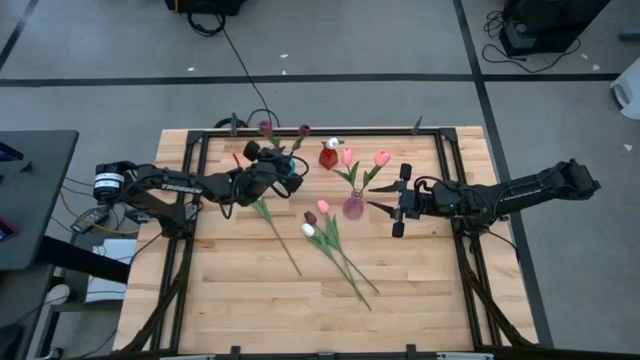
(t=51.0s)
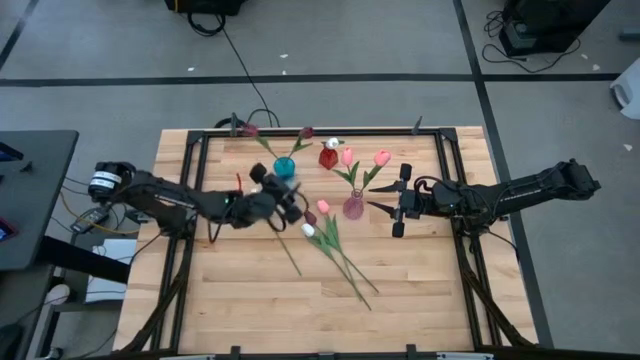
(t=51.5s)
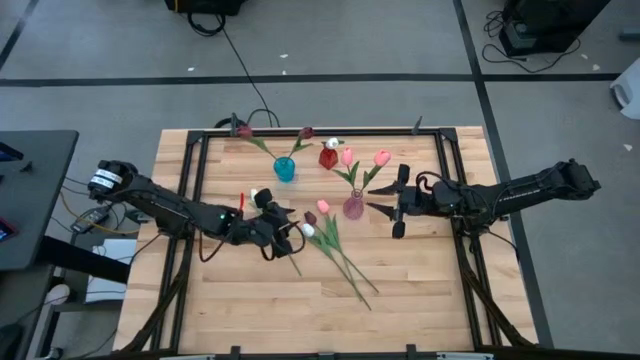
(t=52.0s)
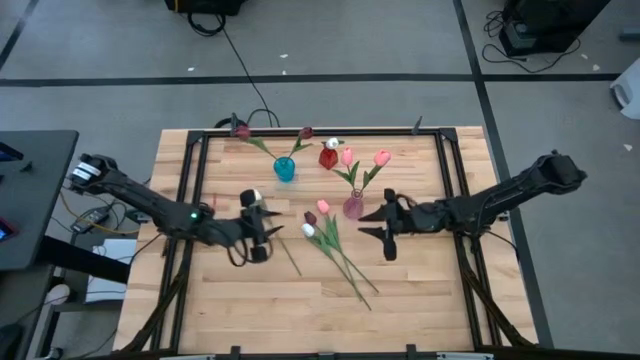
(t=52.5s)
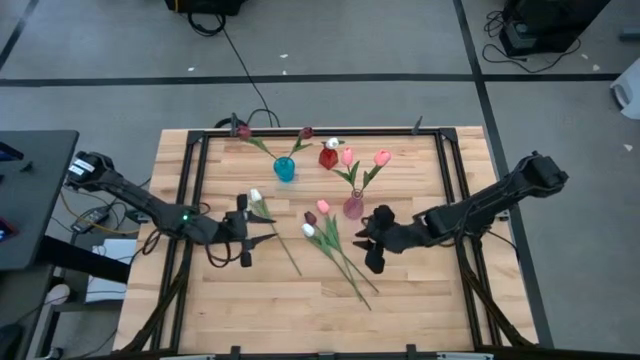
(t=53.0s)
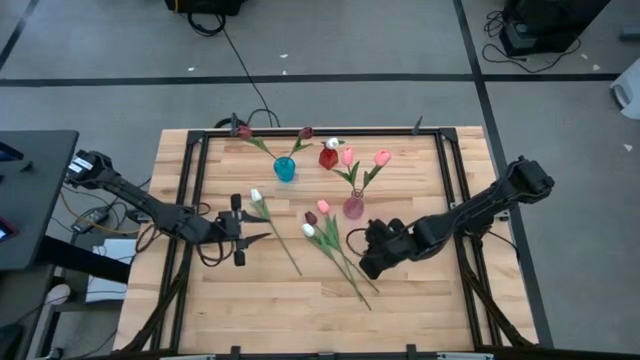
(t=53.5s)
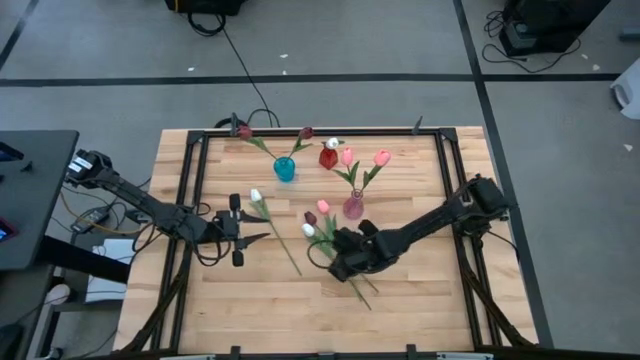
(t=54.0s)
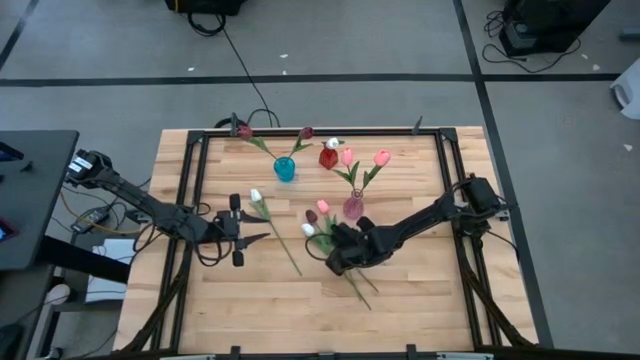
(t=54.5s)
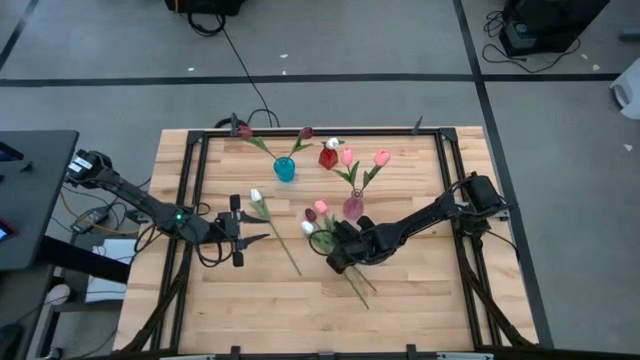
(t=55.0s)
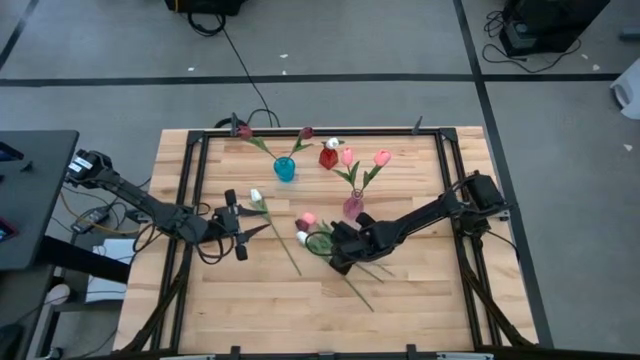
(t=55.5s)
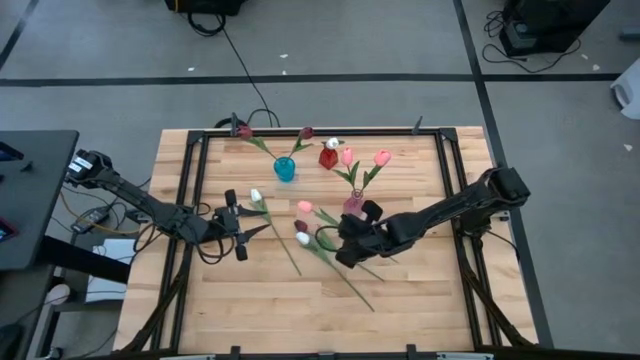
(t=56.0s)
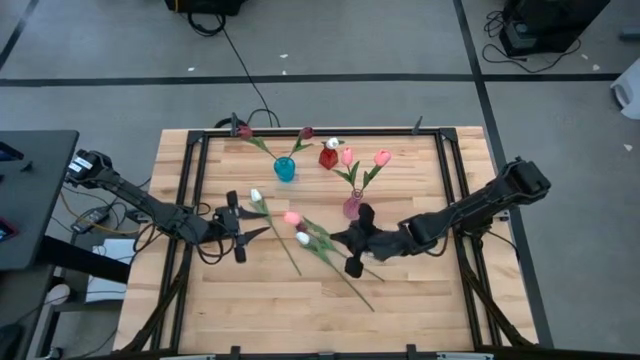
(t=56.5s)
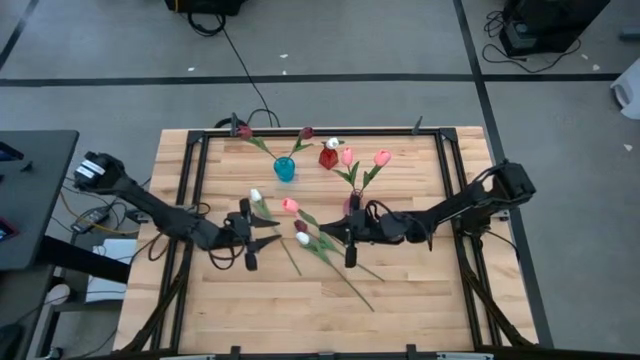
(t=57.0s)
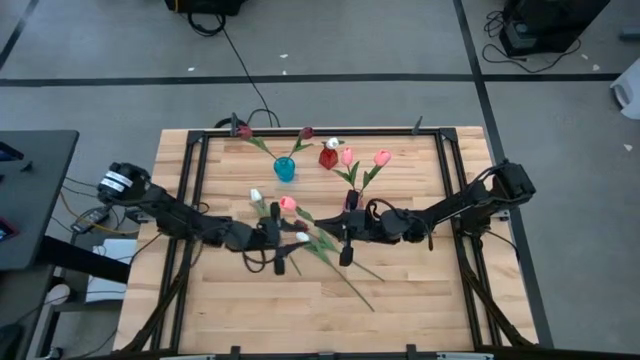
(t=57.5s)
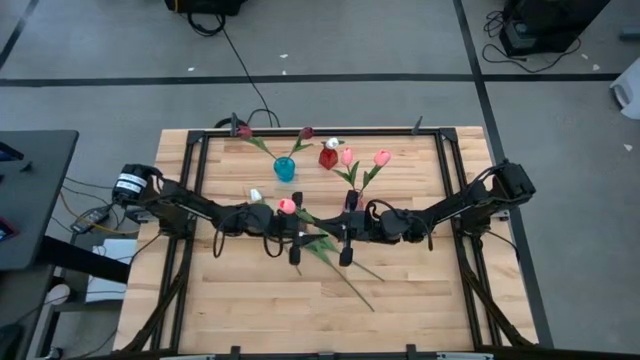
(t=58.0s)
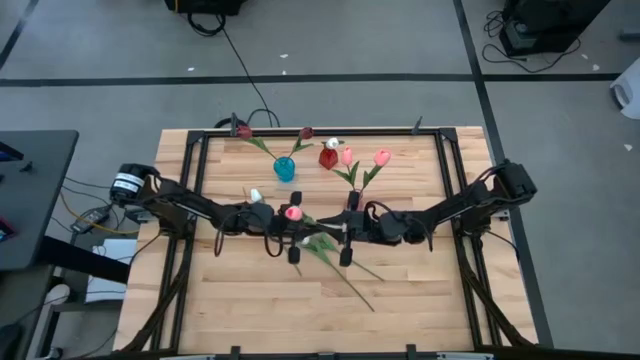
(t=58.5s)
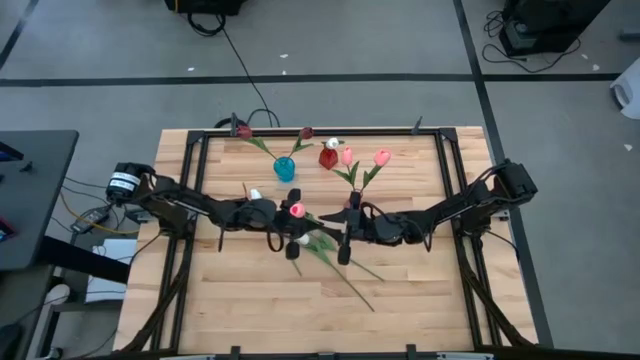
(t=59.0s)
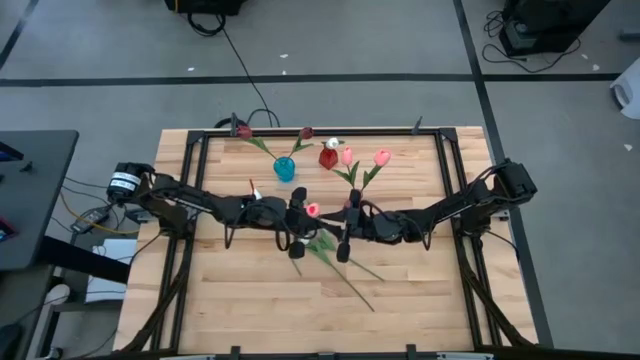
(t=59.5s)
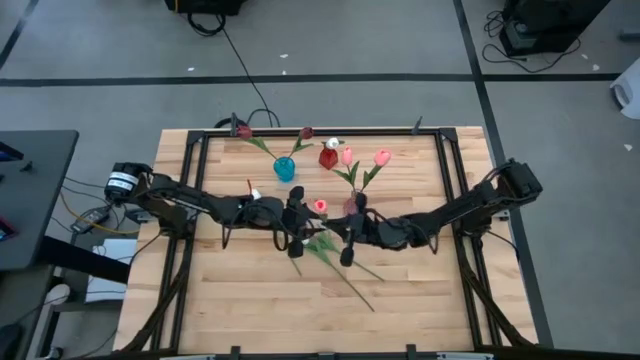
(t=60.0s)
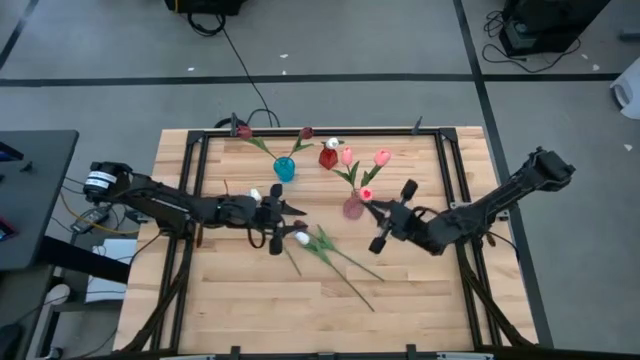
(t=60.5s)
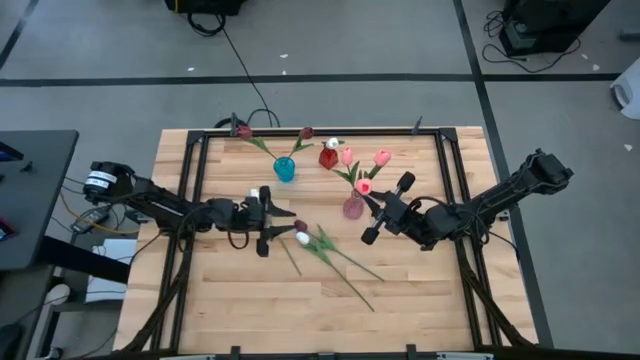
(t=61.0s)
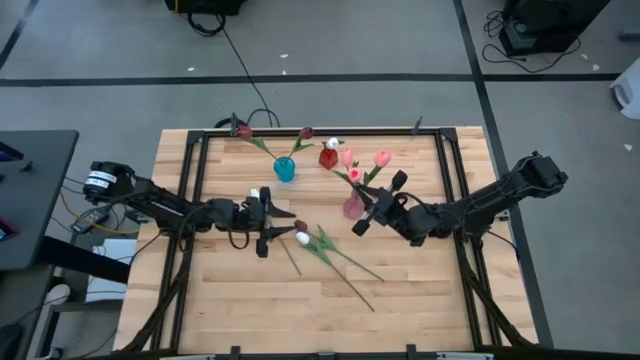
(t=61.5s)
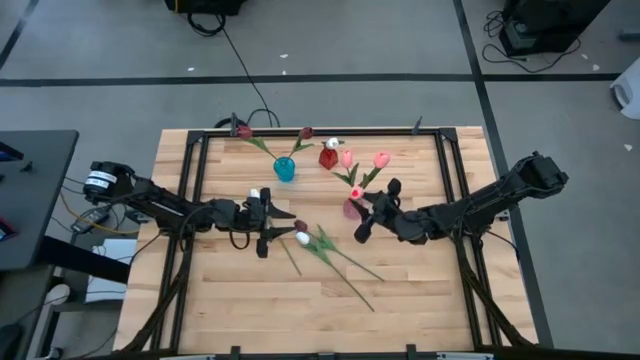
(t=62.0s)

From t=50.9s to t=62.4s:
Task: Sort flowers into vase by color
Put the pink tulip into the violet vase

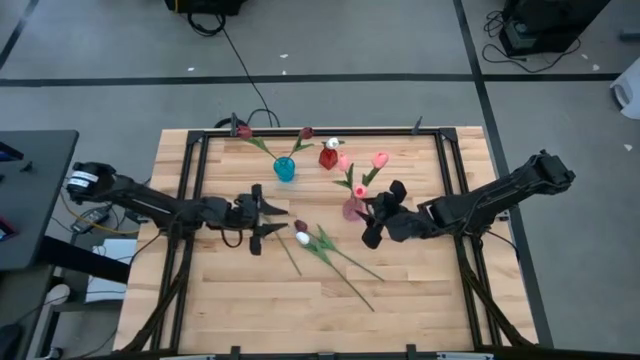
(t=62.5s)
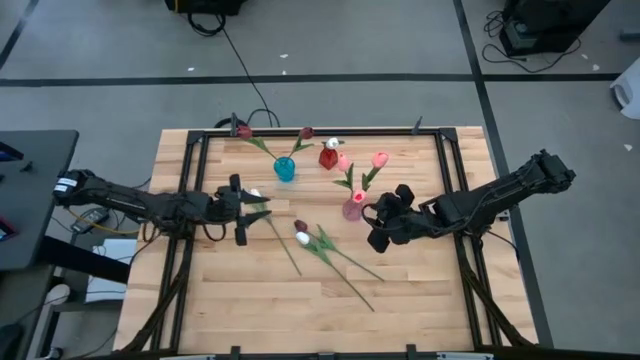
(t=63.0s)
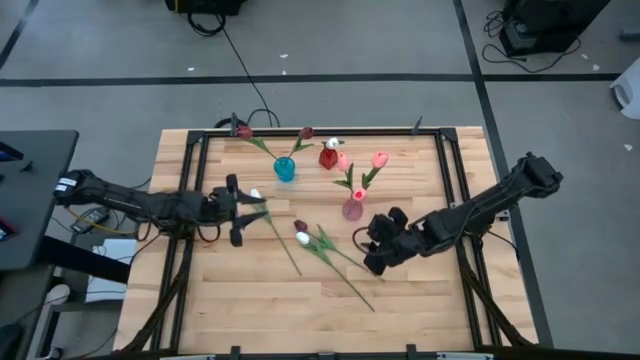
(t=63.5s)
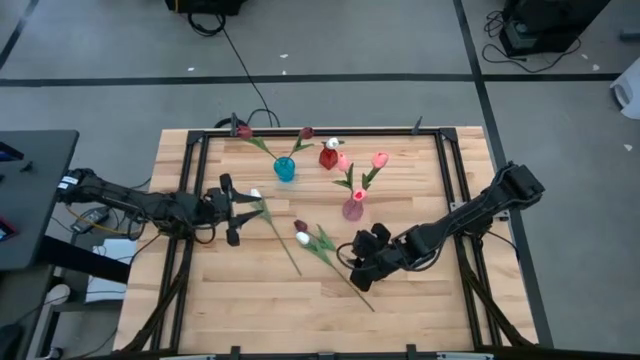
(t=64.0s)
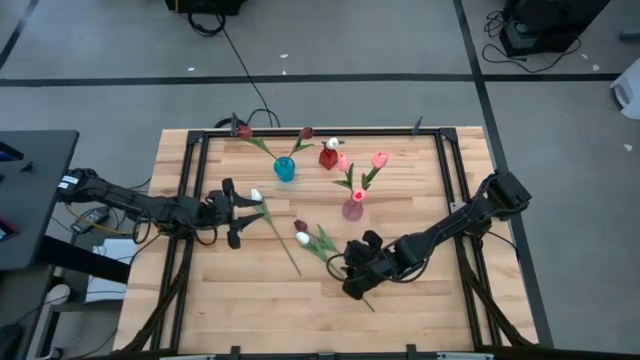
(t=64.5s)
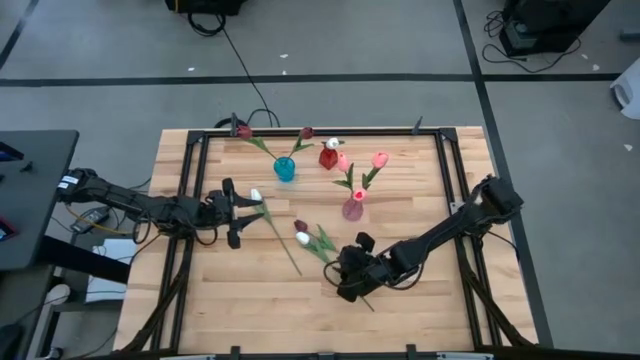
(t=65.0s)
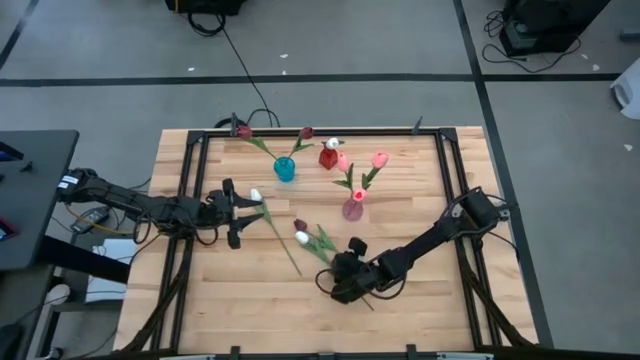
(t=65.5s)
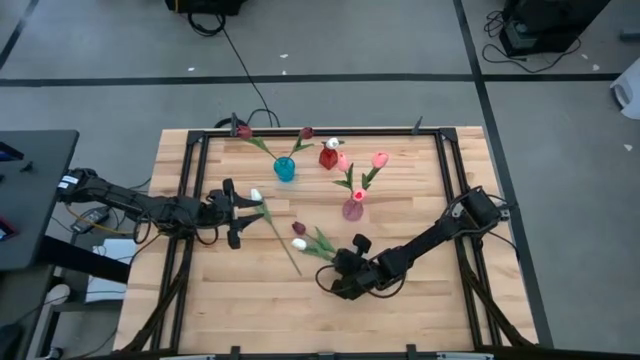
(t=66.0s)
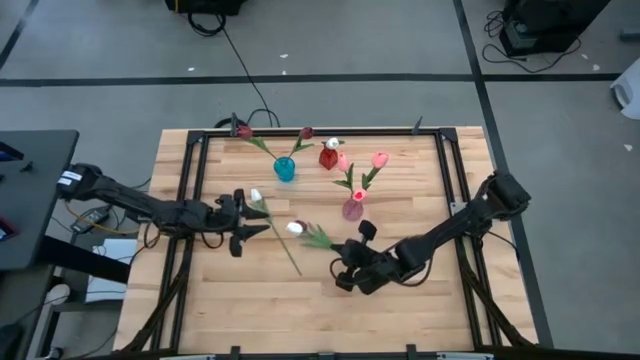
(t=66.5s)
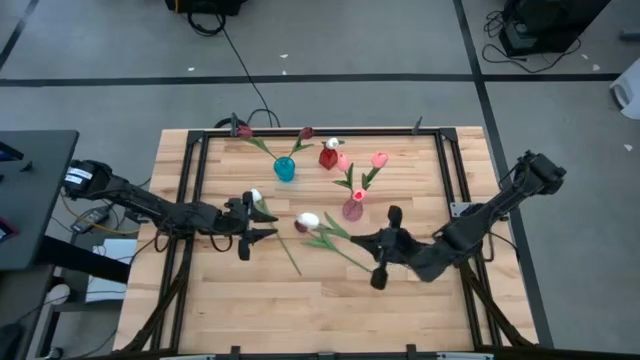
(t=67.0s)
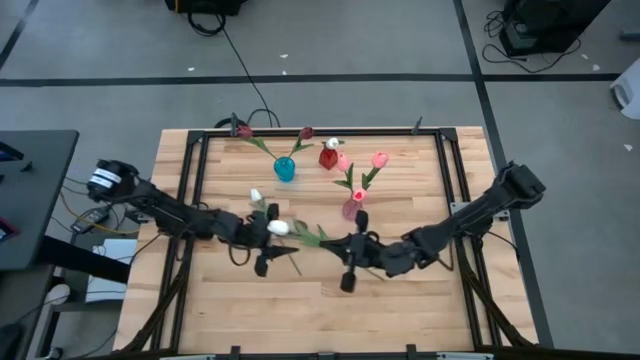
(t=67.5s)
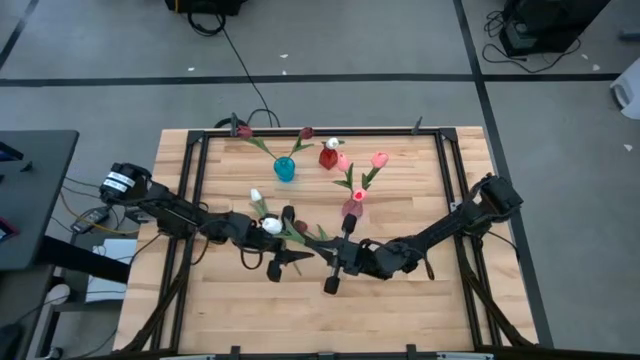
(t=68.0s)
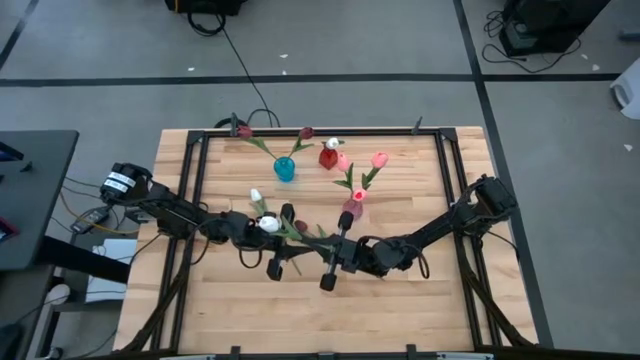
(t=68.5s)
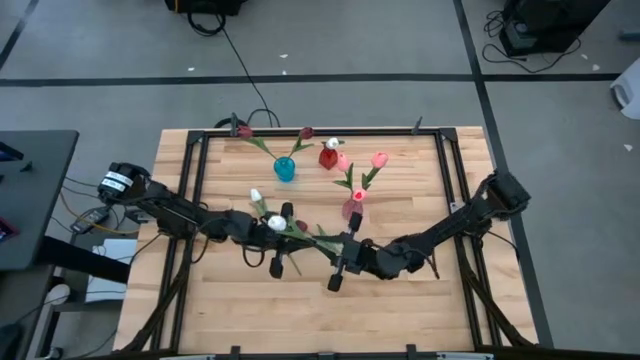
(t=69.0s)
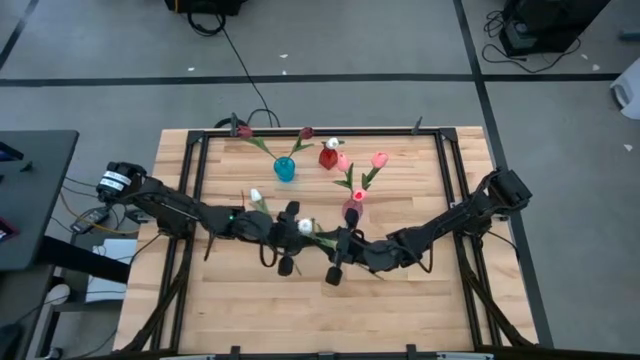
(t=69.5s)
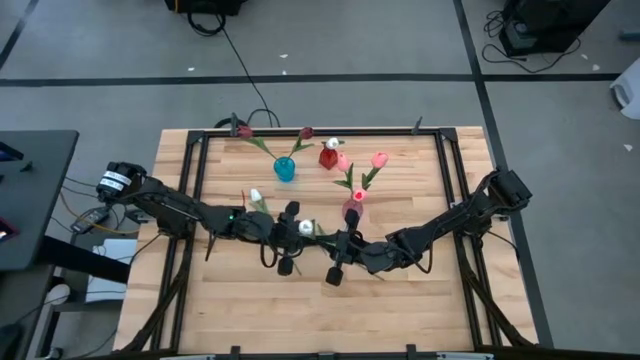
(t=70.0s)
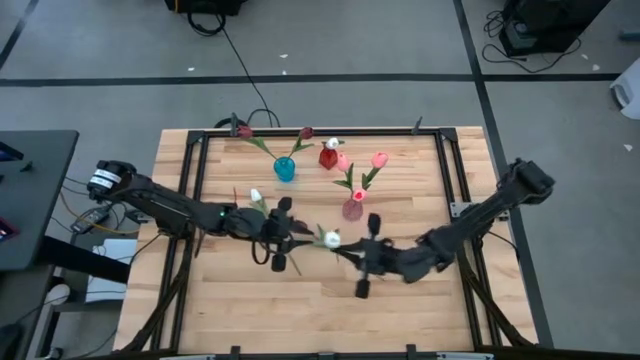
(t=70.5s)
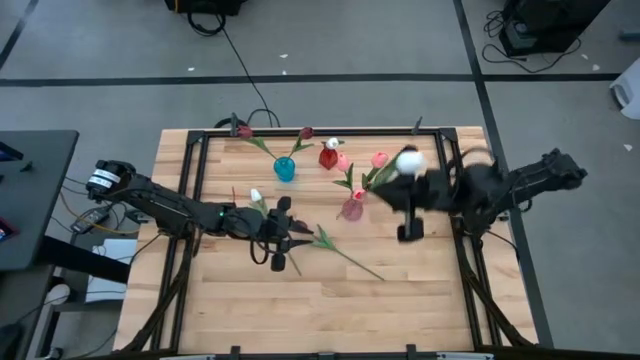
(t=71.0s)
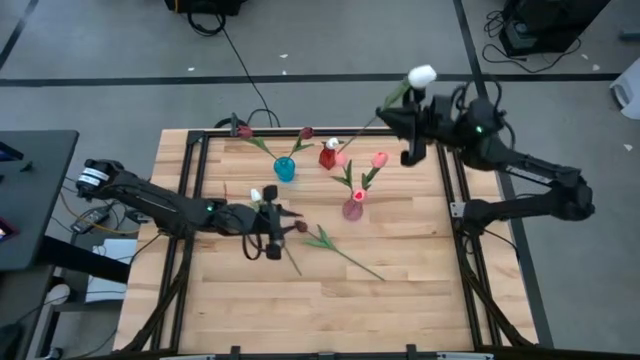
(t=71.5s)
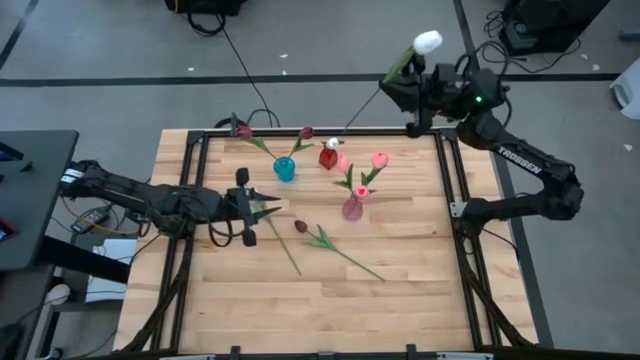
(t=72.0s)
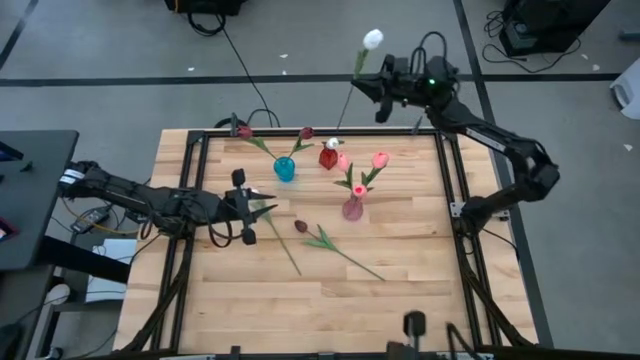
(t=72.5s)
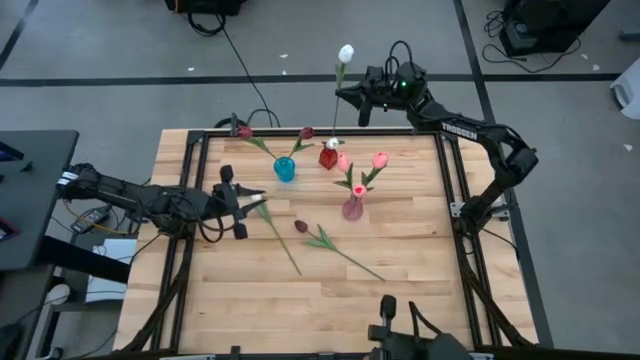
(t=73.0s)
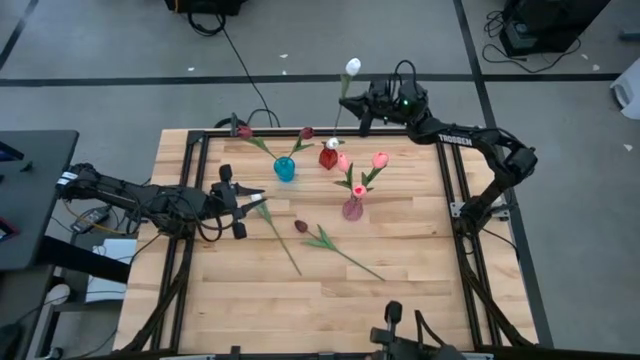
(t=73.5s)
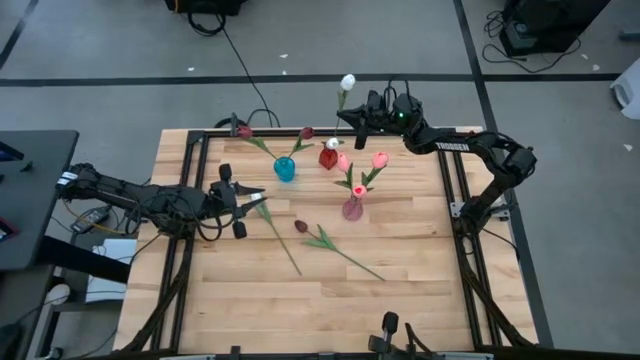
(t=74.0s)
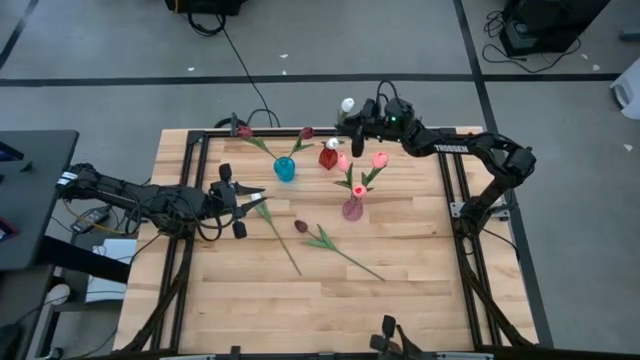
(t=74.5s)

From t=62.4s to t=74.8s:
Put the right white tulip into the red vase
